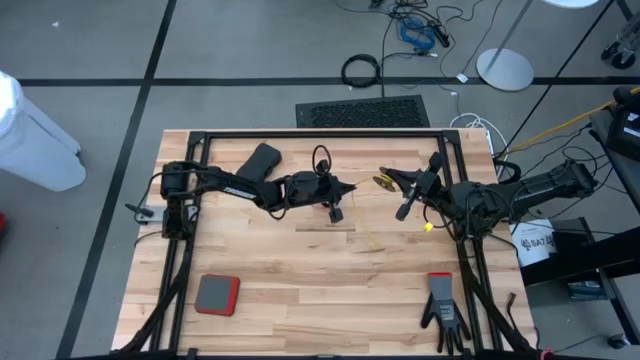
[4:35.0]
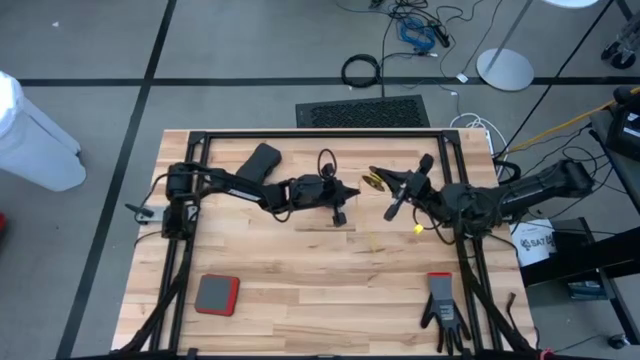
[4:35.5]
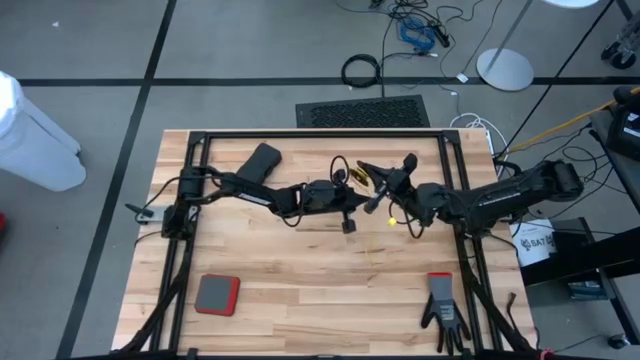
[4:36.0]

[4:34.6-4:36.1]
Task: Coil cords
Coil the yellow wire on the spool

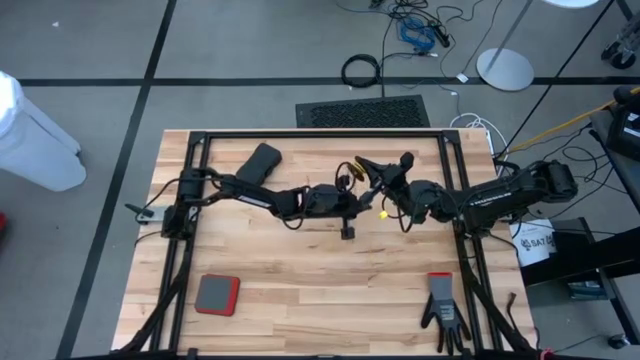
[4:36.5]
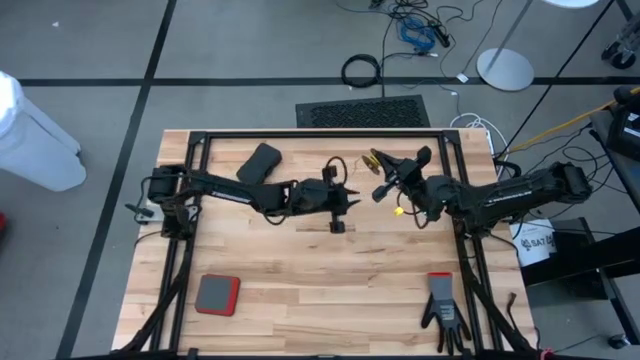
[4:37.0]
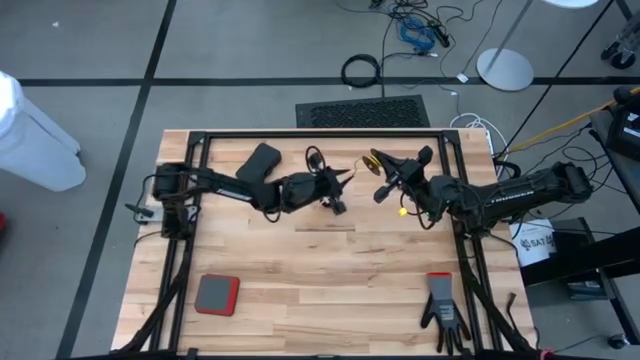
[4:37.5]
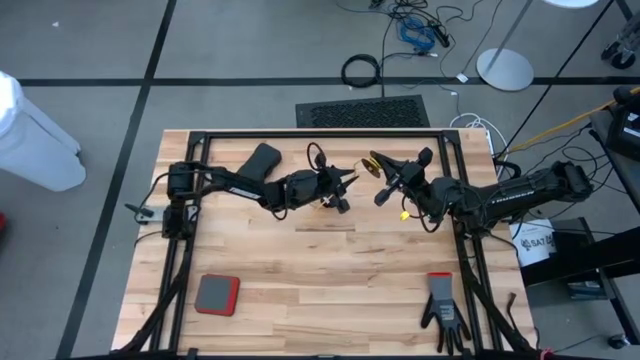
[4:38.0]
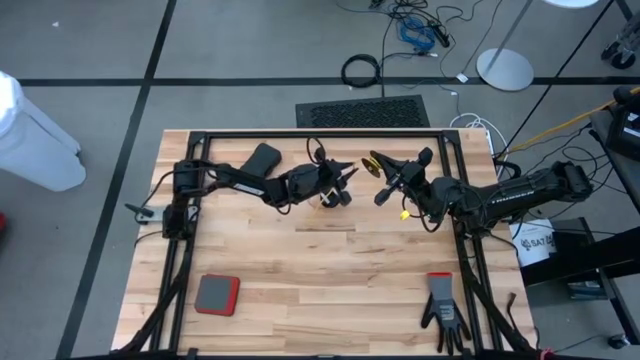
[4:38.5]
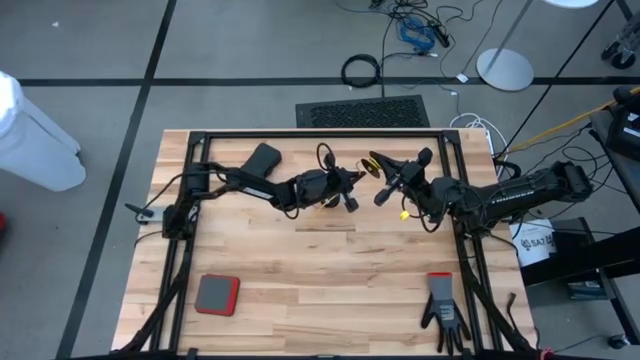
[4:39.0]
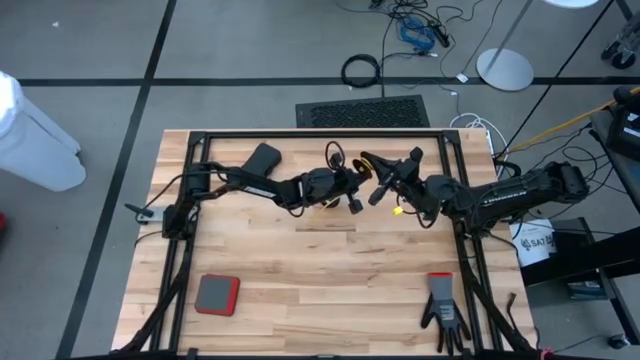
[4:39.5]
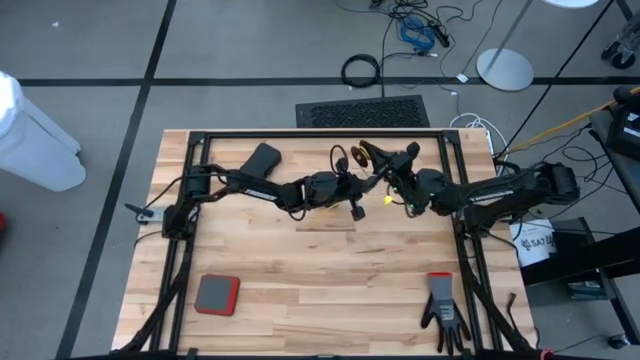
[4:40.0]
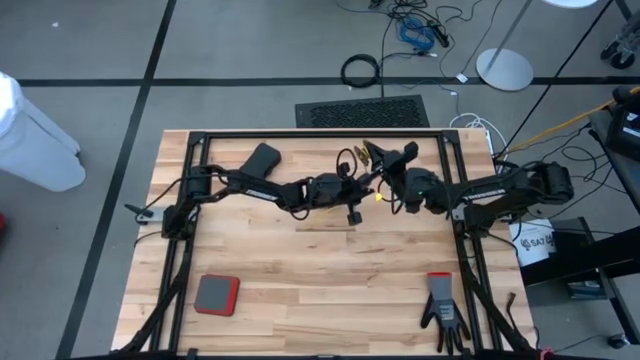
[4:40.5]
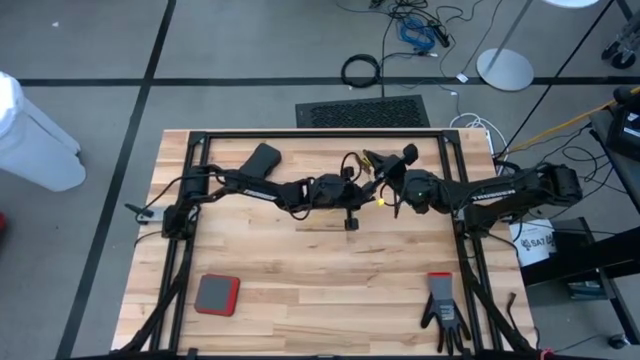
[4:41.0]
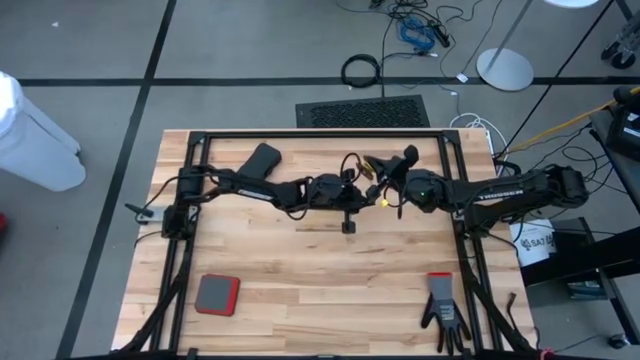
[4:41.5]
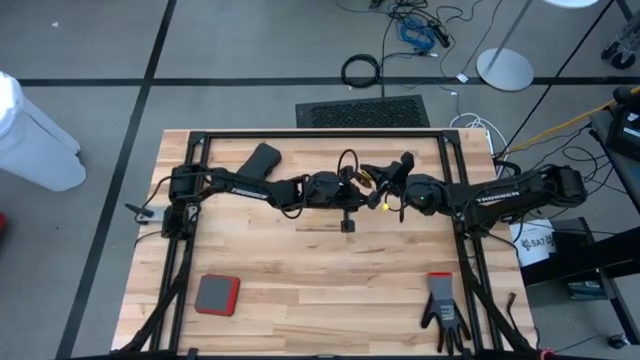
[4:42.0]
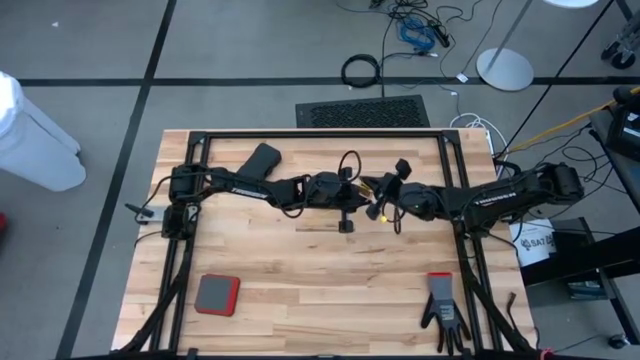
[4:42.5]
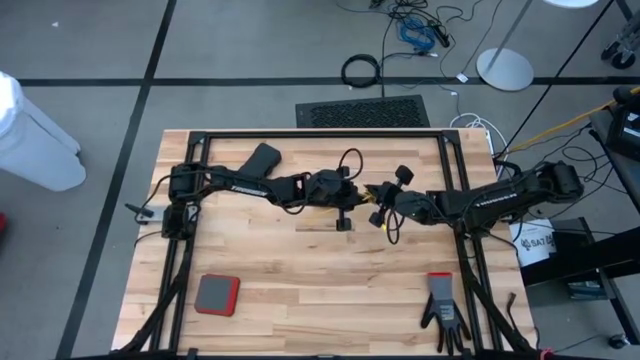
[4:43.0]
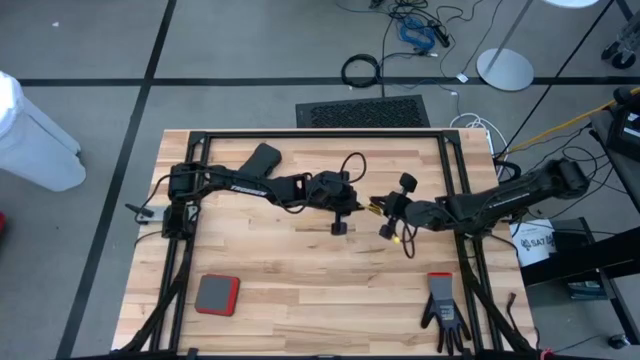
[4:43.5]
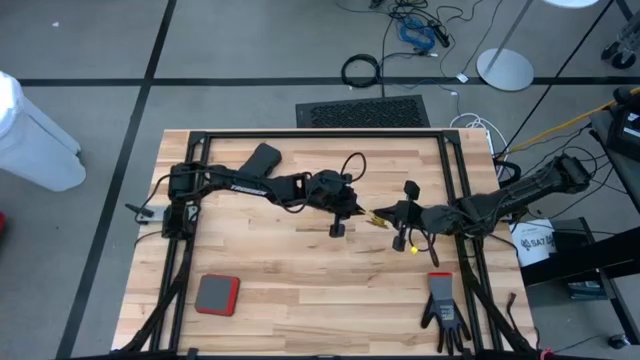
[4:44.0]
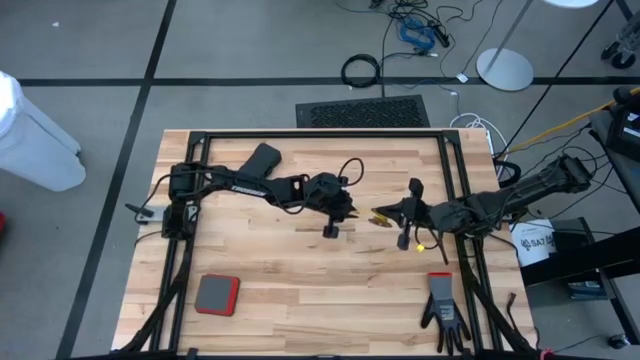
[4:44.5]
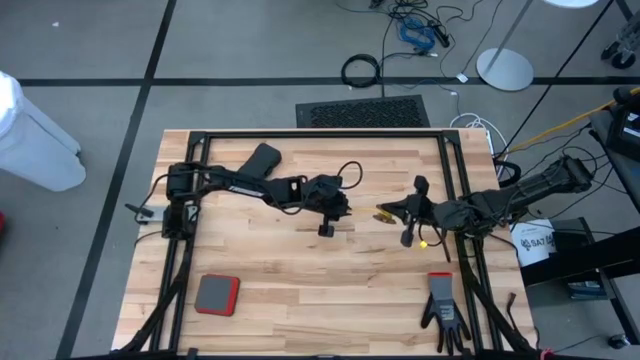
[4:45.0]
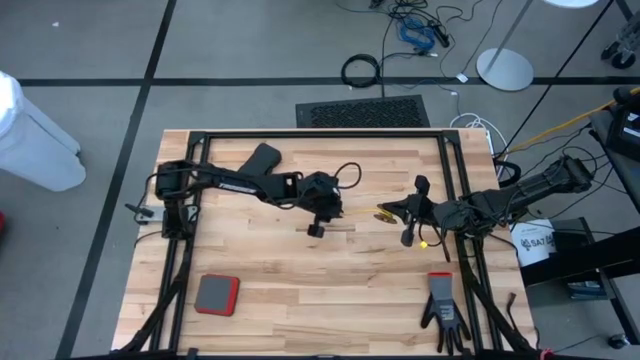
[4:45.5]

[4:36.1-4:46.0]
Coil the yellow wire on the spool

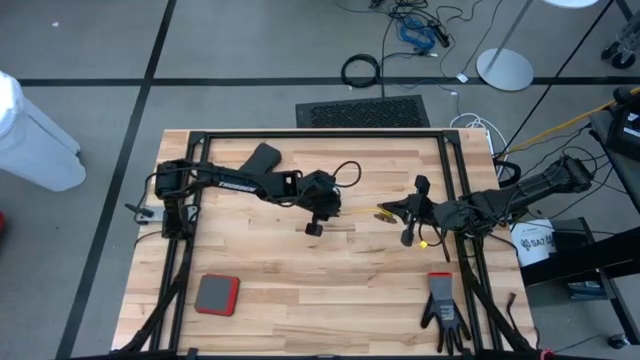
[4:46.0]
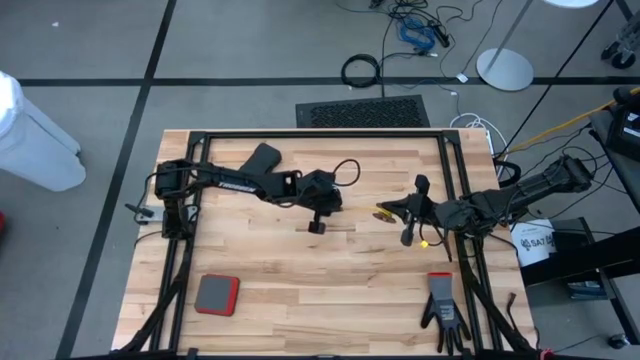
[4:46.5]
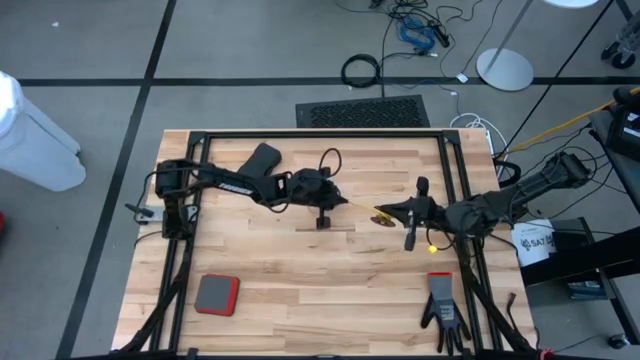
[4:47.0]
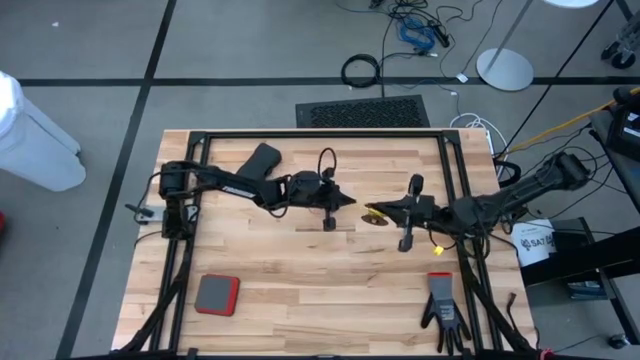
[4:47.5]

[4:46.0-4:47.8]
Coil the yellow wire on the spool

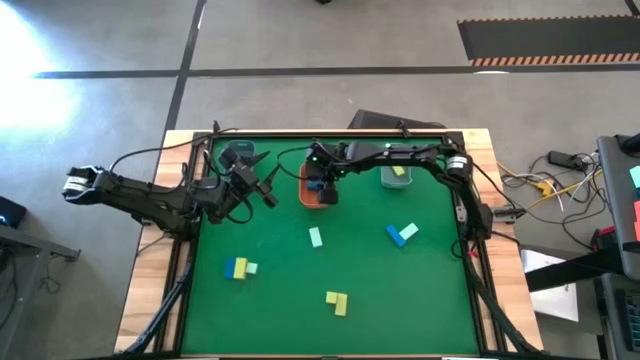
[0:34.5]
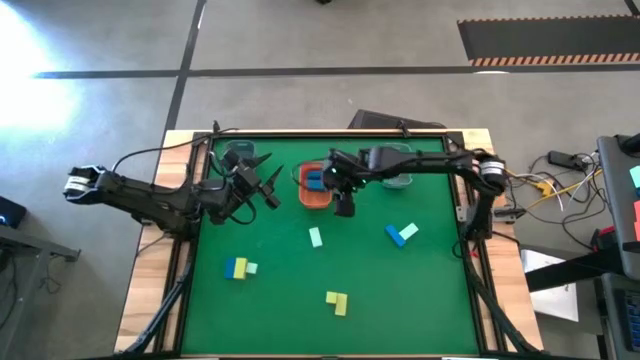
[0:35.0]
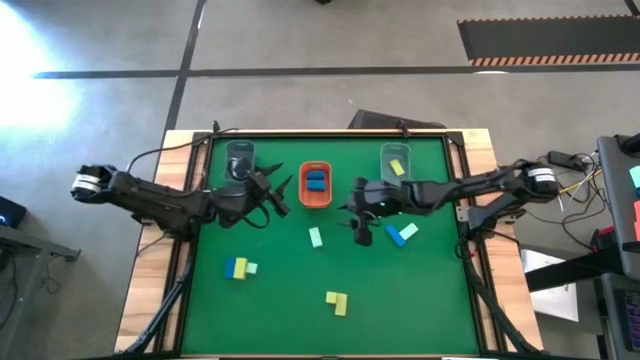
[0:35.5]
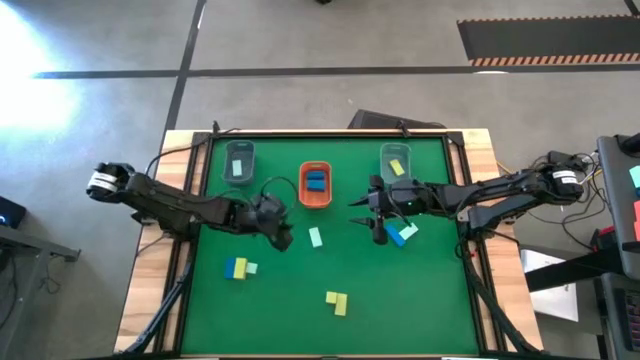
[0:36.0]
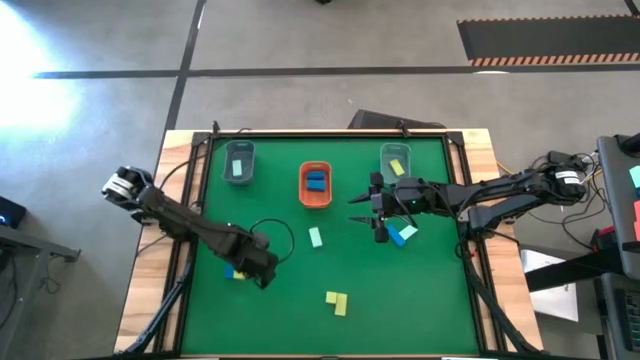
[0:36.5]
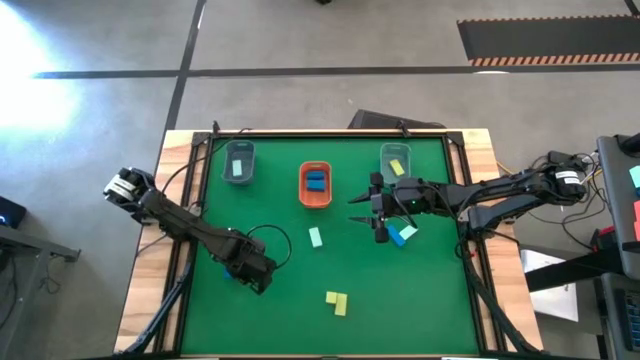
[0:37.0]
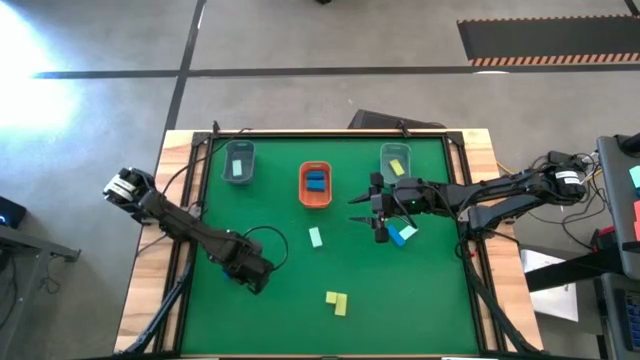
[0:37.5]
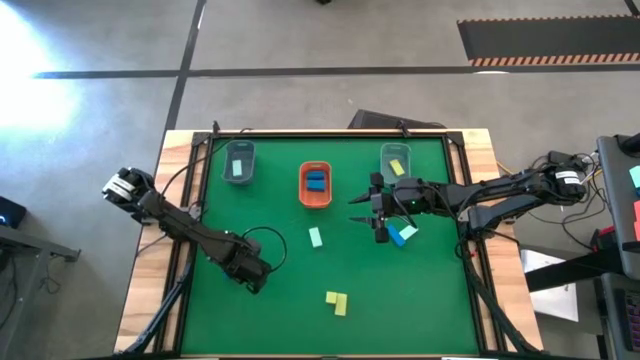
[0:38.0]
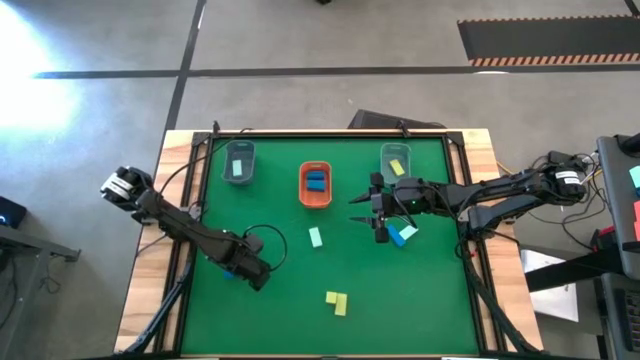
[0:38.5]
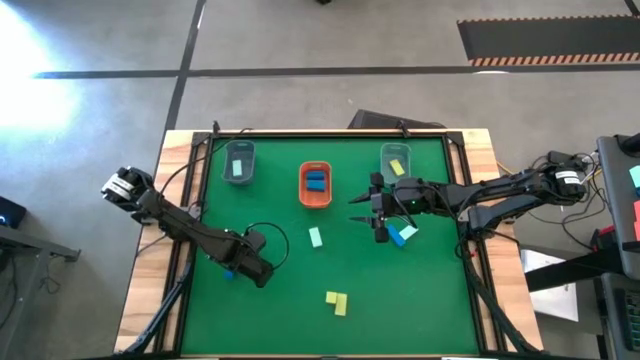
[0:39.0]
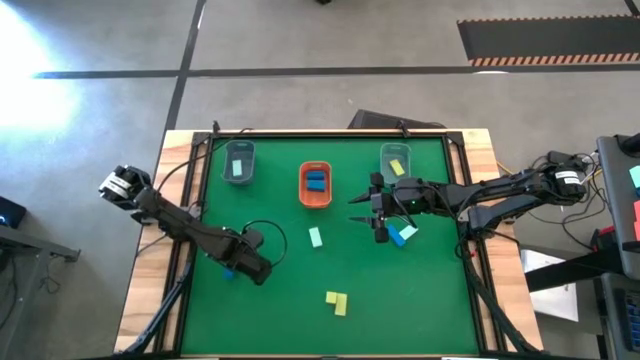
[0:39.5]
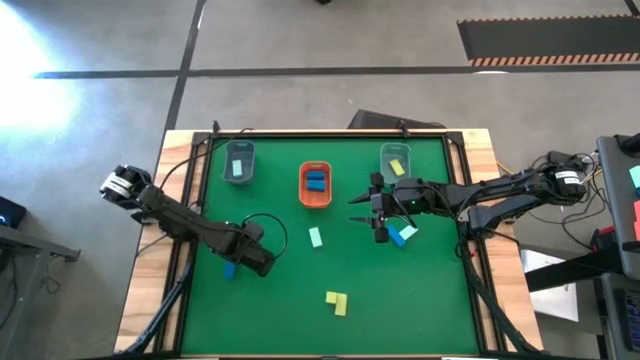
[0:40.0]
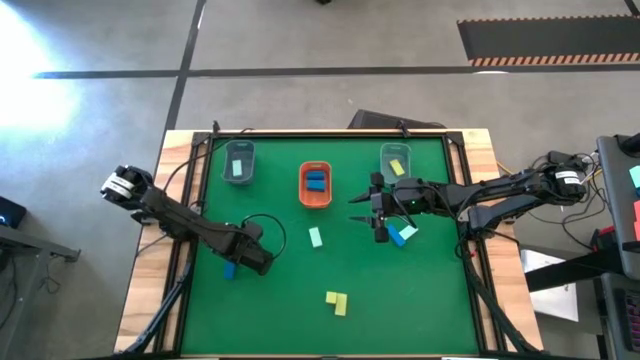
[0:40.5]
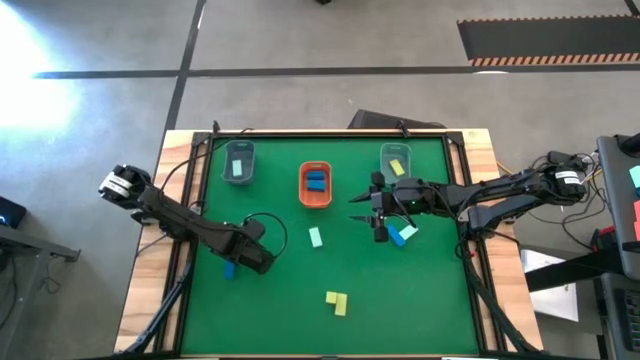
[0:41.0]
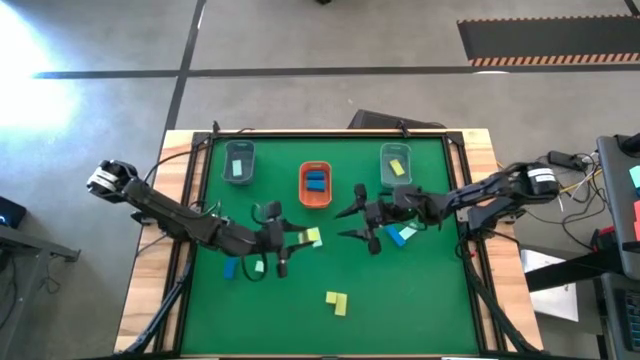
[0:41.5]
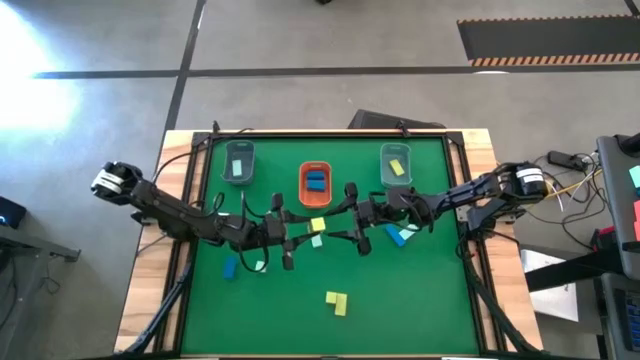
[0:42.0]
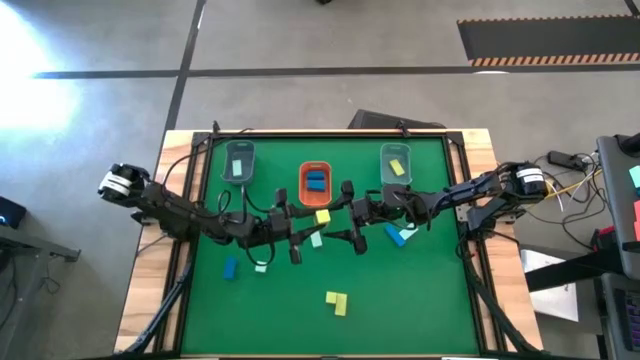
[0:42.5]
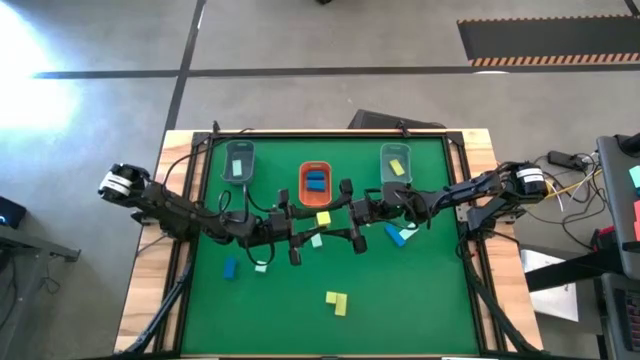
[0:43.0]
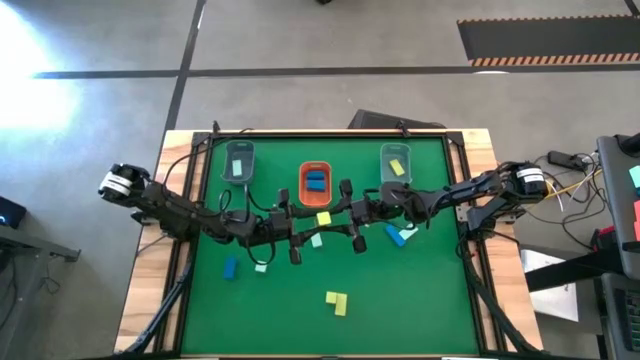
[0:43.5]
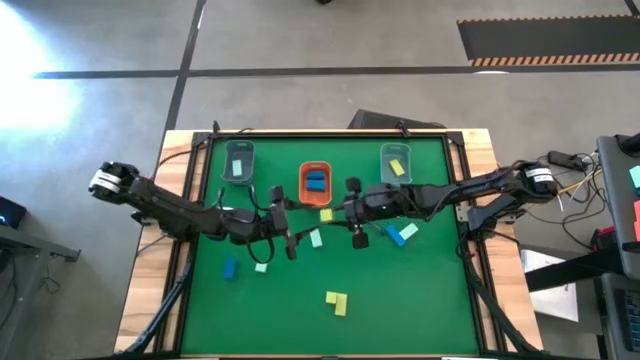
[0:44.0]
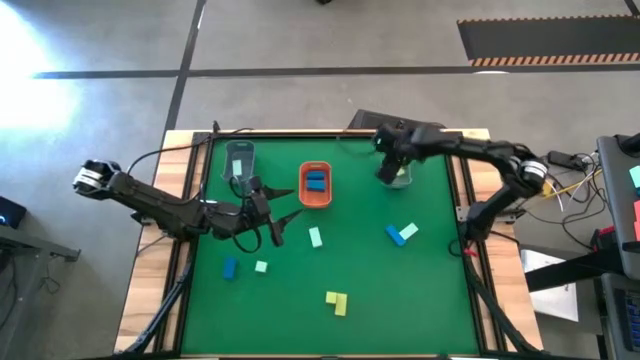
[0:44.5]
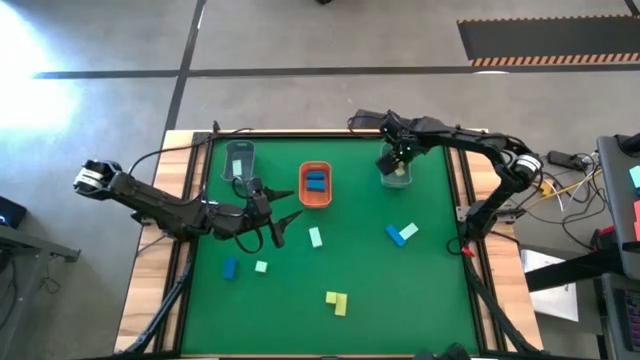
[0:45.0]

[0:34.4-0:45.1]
Task: Sort & place blocks by color
Put the yellow wooden block into the green bin
